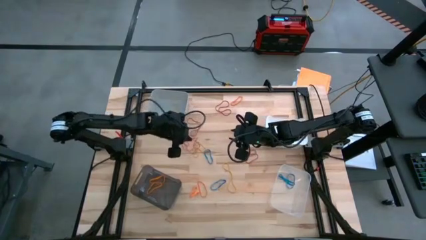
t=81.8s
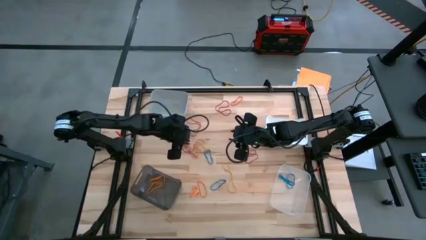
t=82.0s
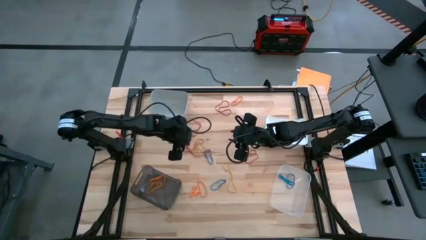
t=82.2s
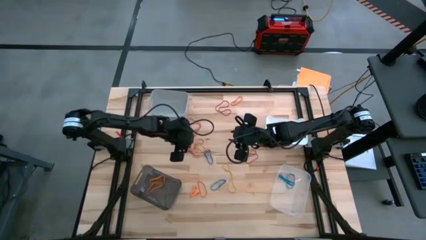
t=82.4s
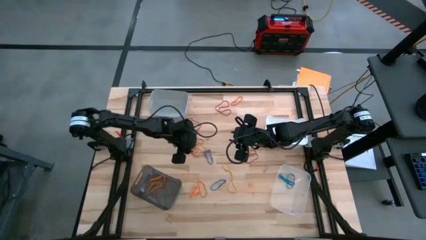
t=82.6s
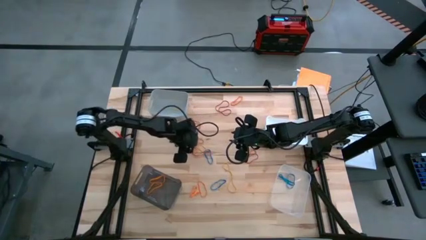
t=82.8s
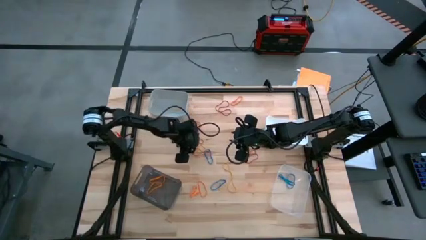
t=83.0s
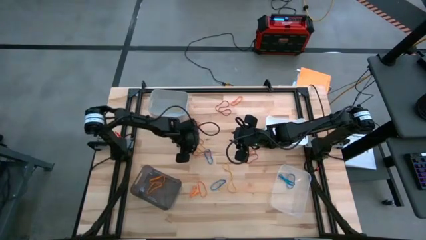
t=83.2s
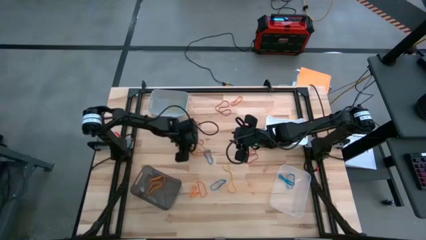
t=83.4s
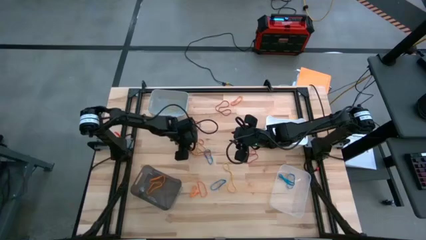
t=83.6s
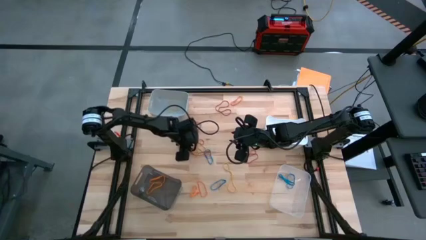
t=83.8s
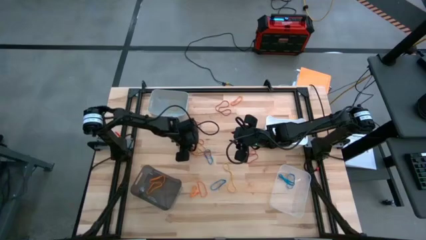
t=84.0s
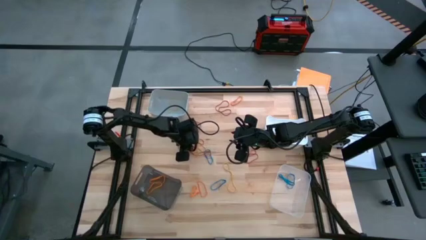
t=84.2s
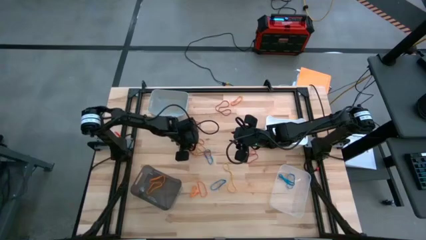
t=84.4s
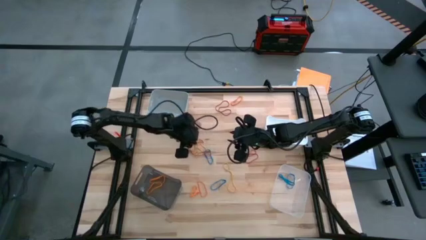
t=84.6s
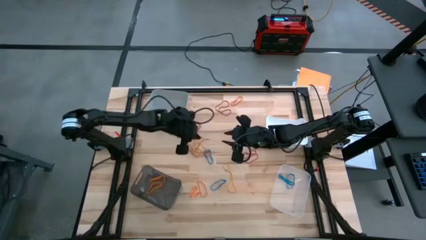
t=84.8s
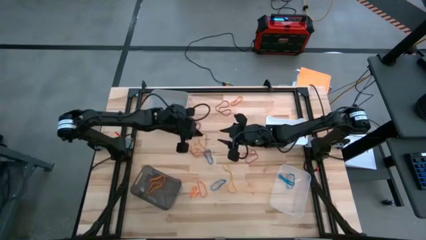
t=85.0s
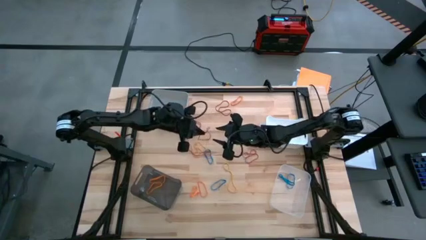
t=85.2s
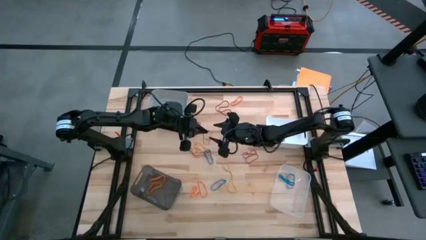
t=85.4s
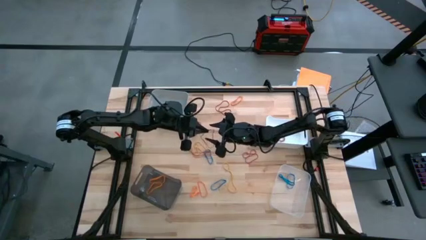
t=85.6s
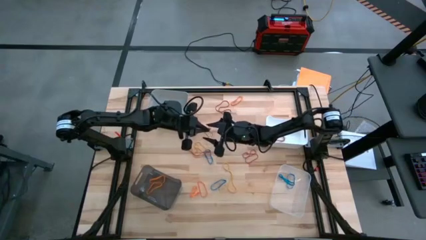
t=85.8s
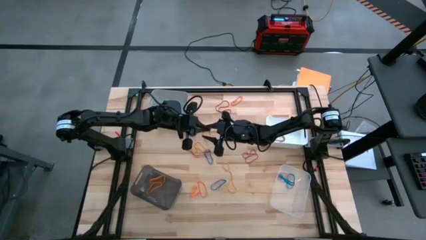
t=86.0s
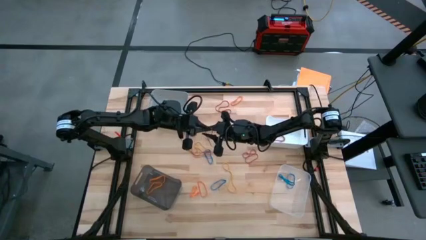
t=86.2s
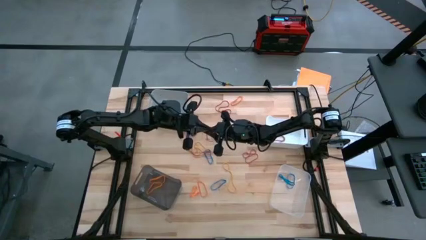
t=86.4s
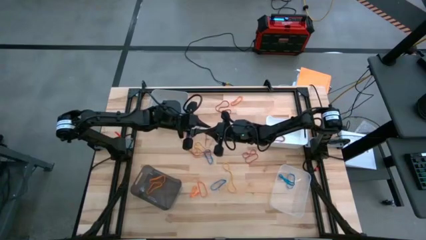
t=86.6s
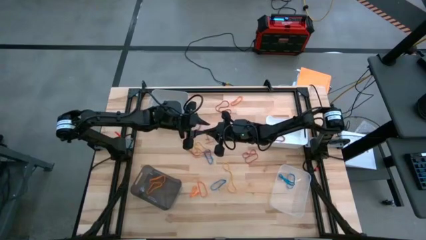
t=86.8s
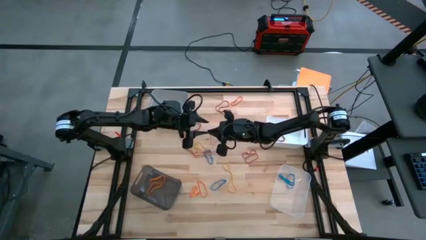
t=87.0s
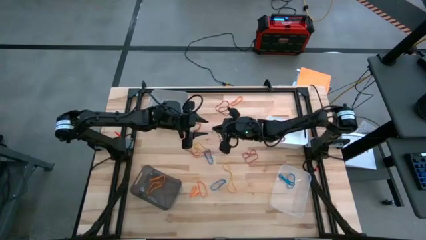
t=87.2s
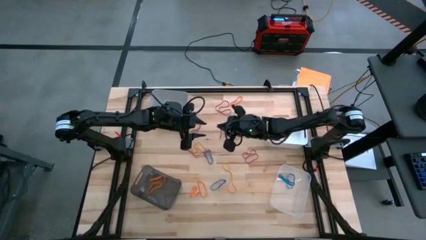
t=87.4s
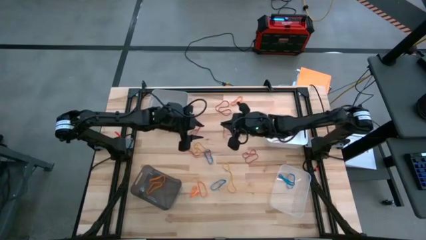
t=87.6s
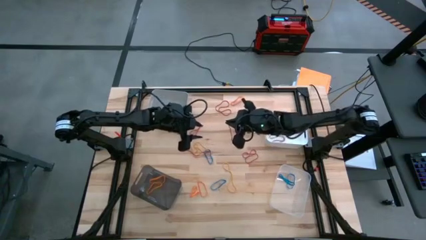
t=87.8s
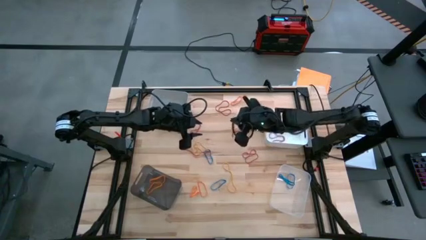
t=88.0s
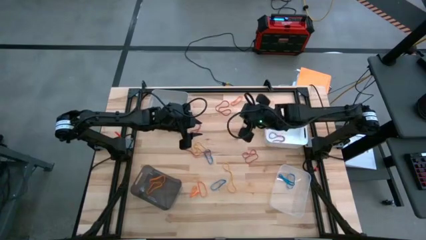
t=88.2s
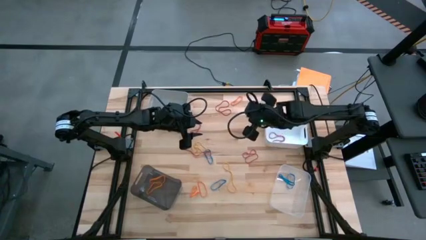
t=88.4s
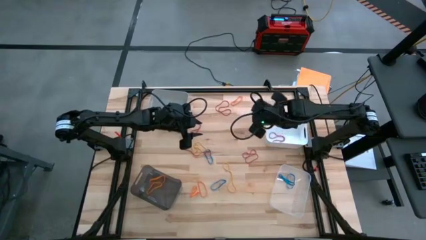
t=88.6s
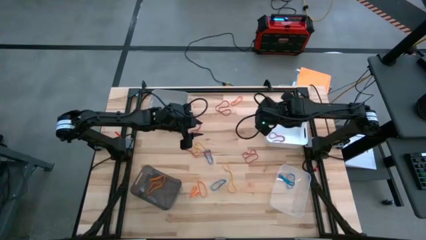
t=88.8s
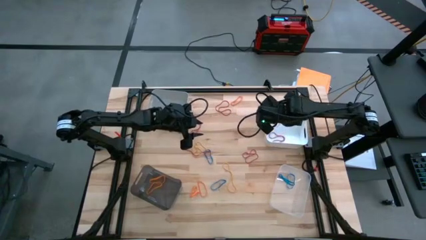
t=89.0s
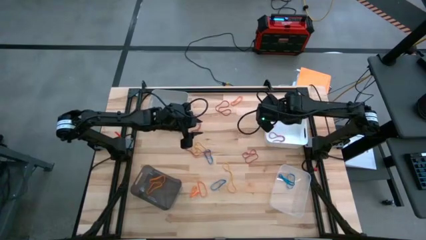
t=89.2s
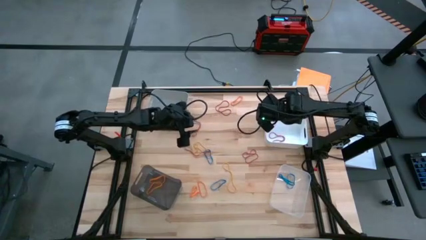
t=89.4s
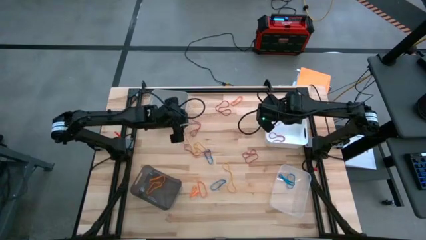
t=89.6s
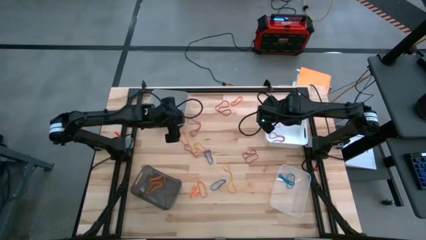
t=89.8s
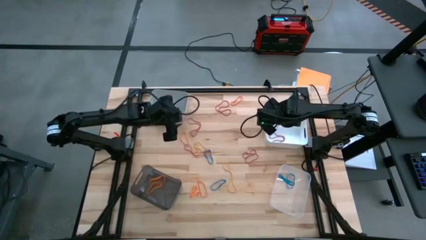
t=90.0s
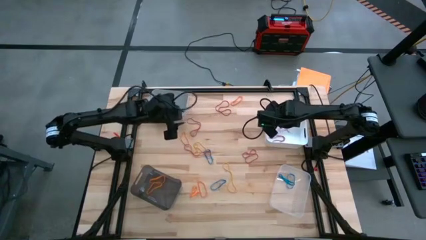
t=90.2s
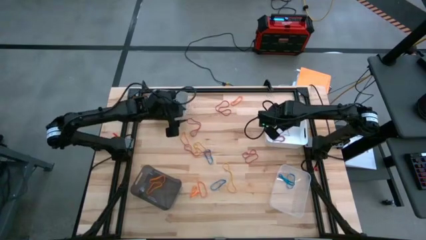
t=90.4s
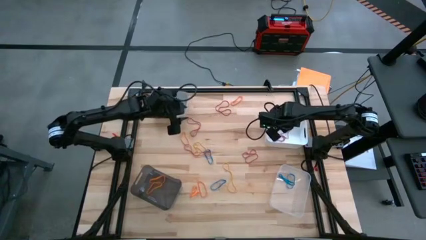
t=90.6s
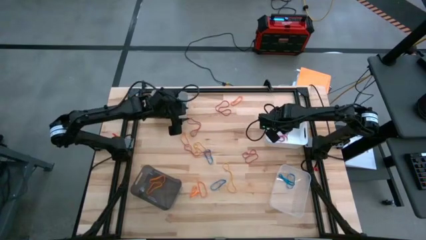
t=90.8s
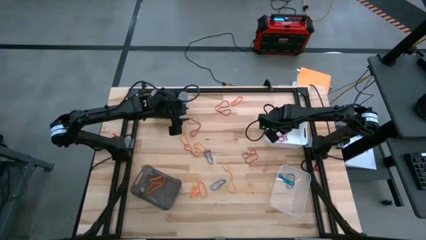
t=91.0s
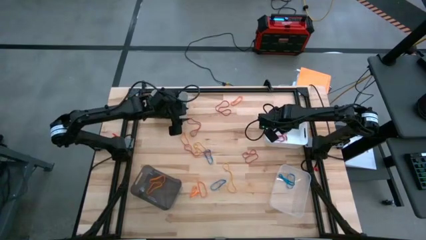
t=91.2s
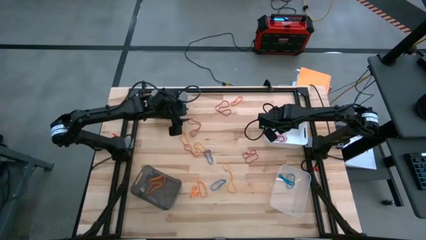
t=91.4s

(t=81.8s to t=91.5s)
Task: Sort rubber bands into baskets
Put the red rubber band into the white bin

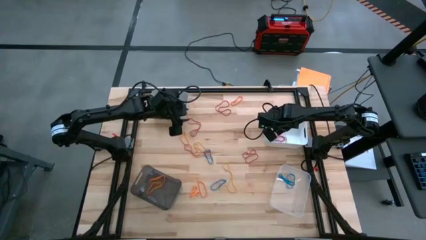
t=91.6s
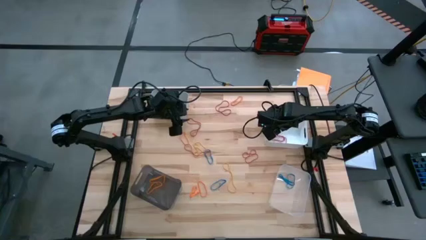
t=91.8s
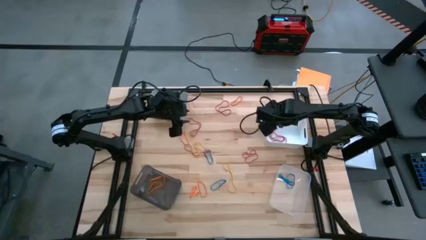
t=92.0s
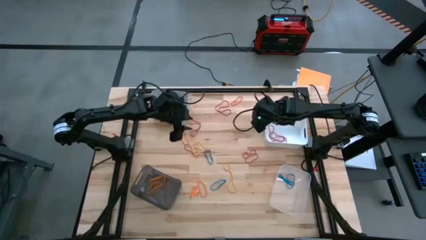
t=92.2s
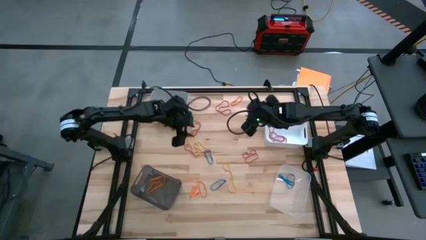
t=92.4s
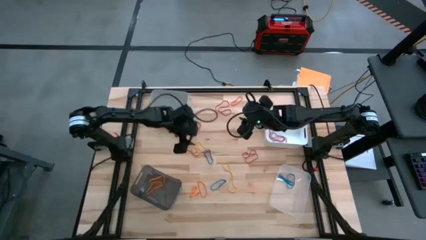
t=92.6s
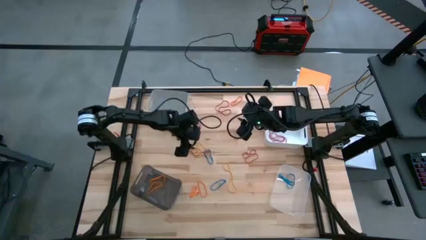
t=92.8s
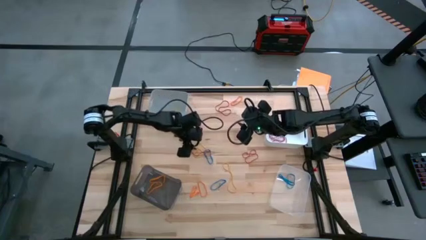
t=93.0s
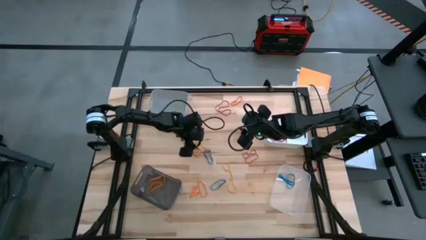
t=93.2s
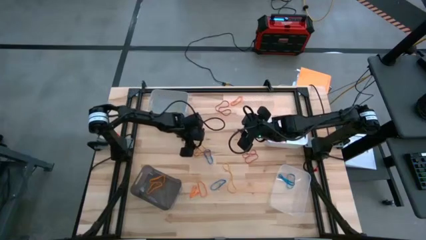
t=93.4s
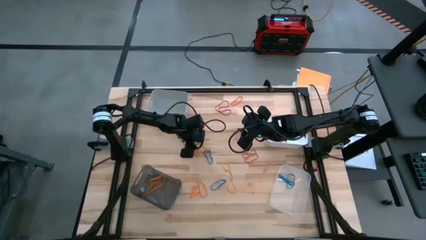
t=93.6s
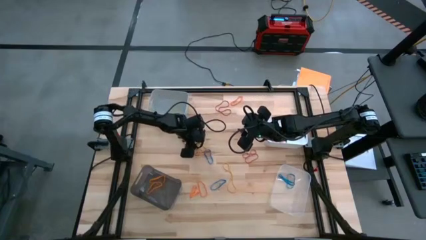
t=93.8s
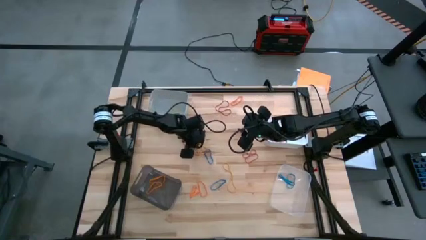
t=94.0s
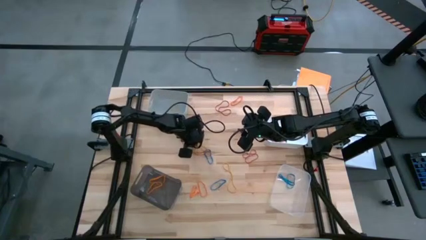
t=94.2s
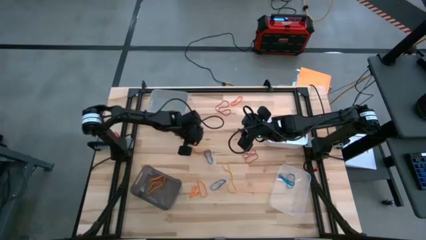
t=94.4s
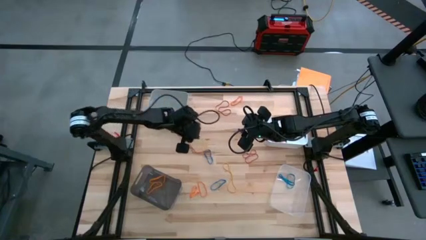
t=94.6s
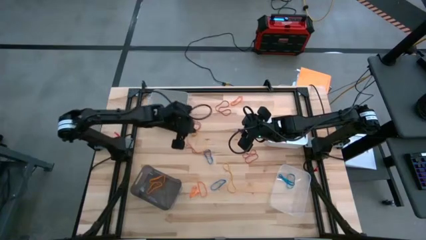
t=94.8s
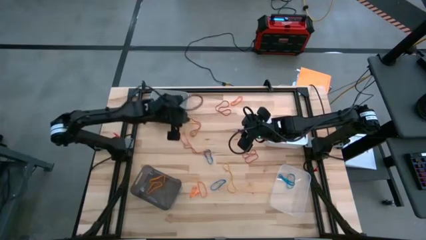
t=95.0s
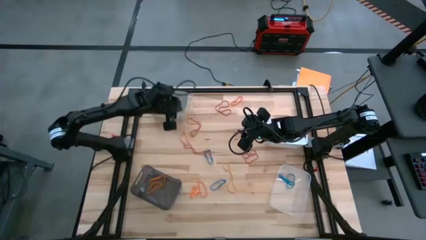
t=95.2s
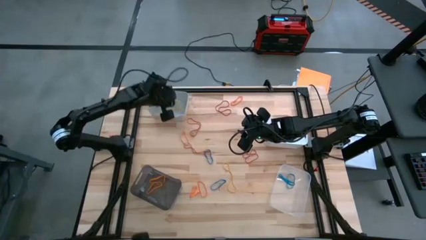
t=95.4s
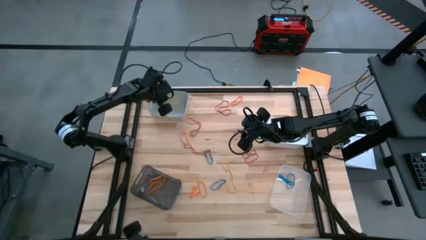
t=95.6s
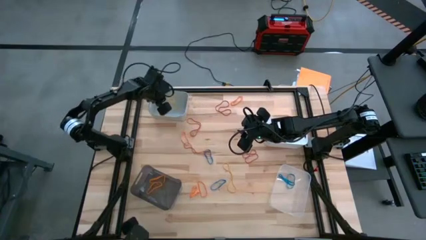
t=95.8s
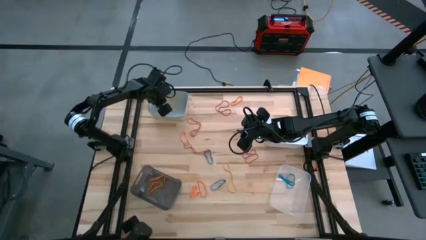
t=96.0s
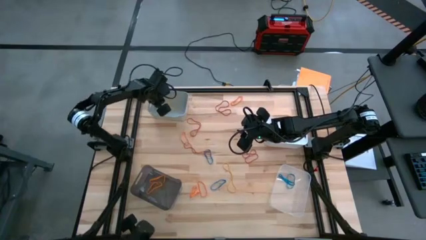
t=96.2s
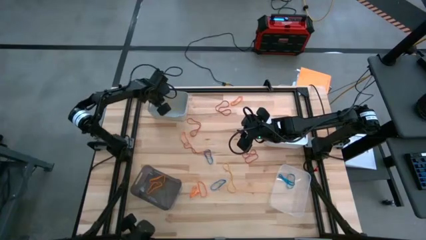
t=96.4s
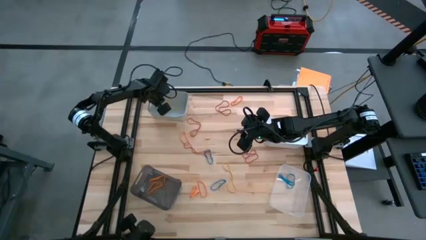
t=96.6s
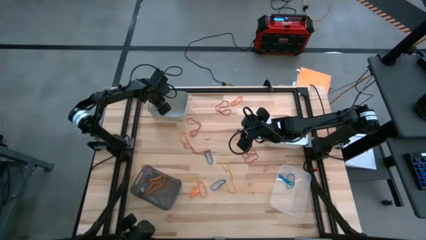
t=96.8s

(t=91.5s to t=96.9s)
Put the yellow rubber band into the gray bin

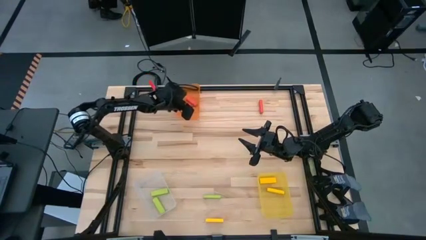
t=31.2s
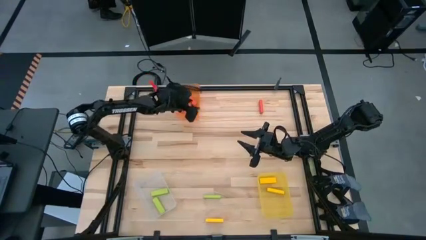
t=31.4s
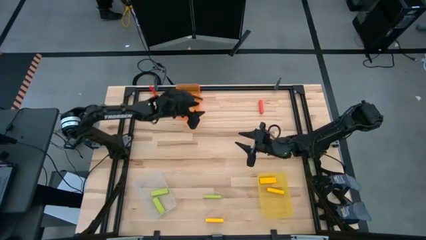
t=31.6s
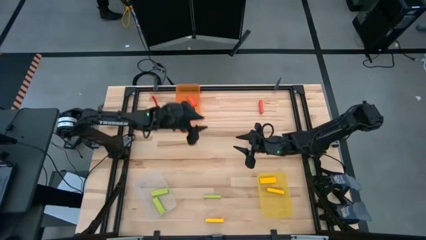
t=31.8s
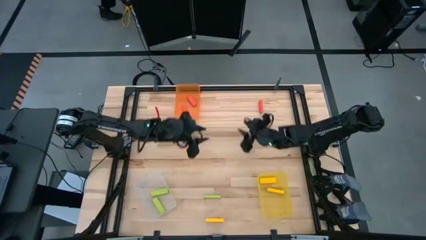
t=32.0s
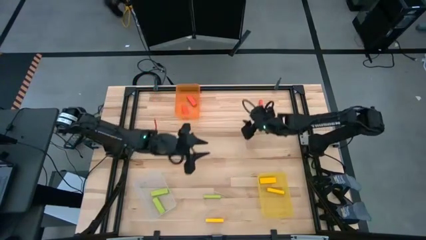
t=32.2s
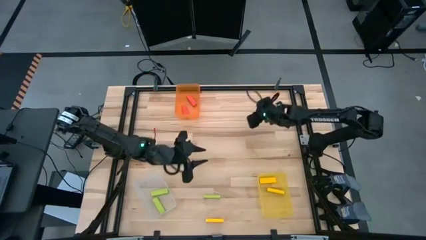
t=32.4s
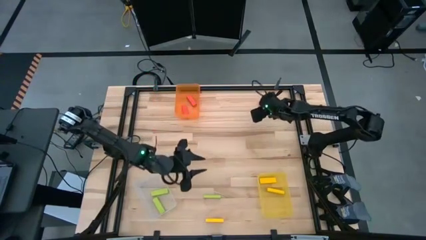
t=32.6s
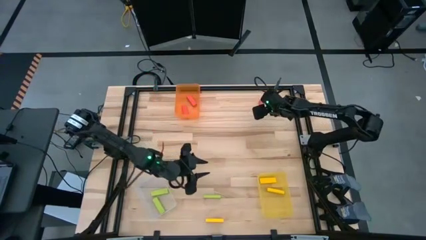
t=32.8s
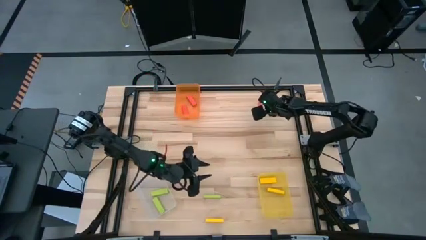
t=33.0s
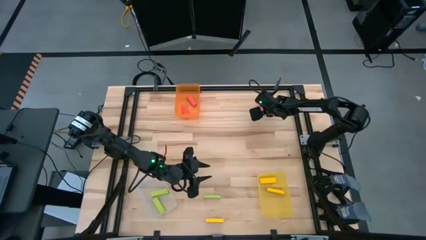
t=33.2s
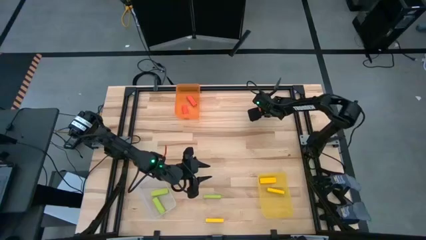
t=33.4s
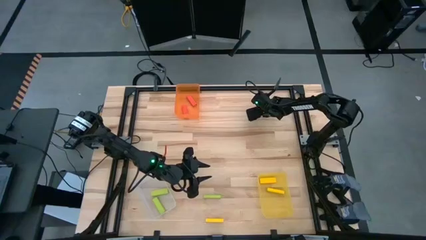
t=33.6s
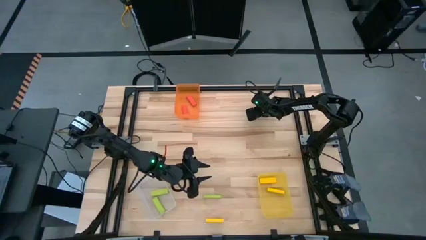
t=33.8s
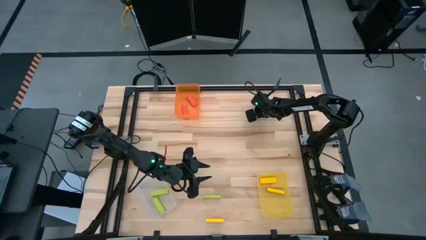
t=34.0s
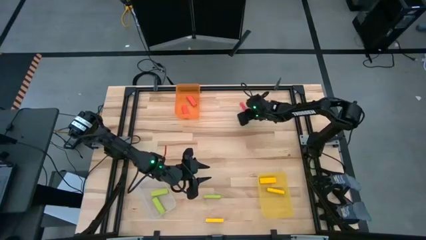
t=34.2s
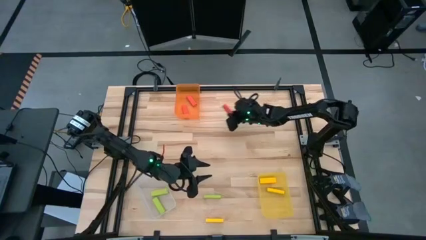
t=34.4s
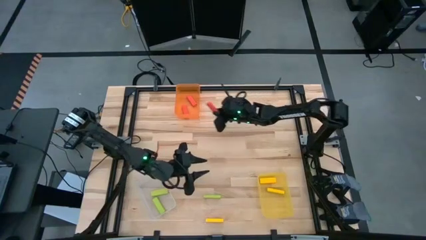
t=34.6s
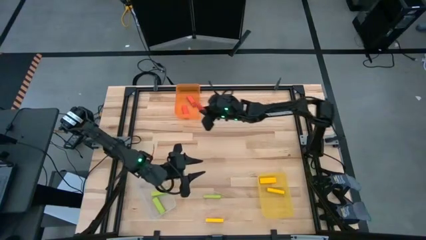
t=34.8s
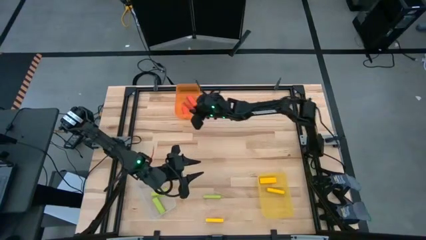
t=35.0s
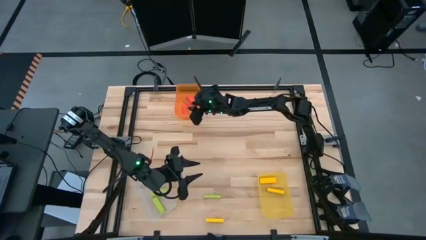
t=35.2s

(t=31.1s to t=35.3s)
Task: Sort blocks
Put the red block into the orange bin
